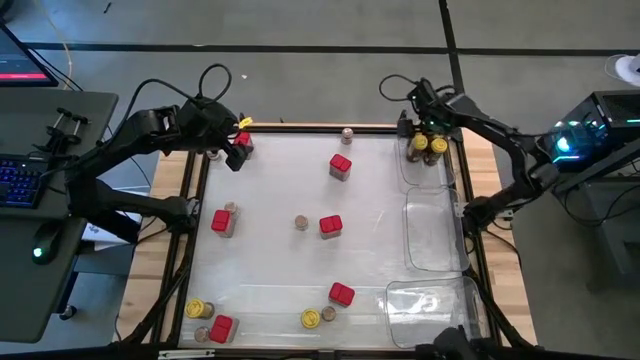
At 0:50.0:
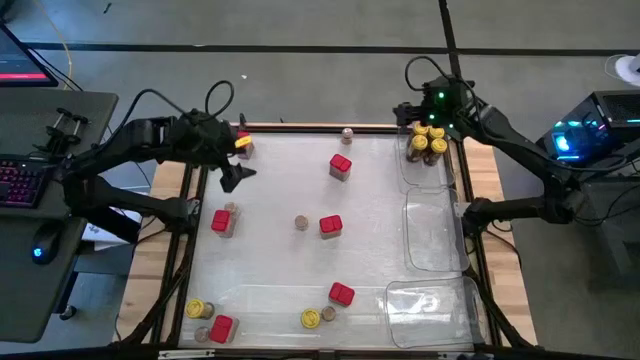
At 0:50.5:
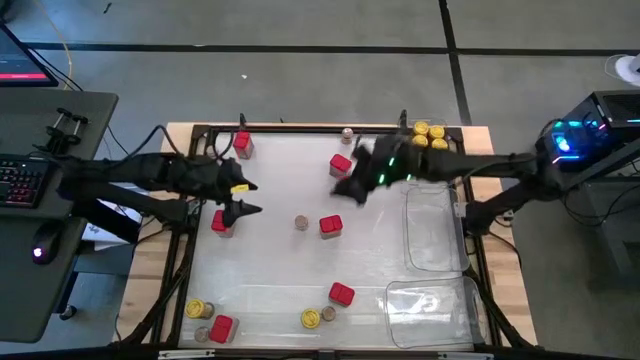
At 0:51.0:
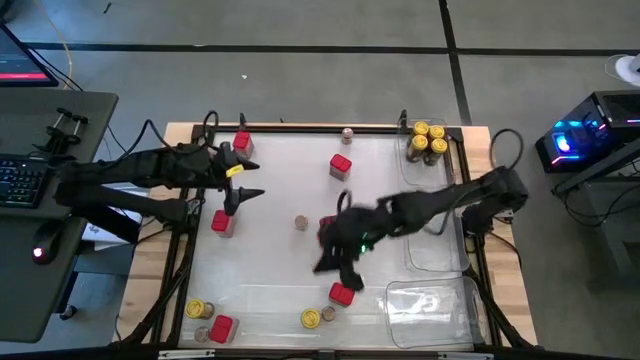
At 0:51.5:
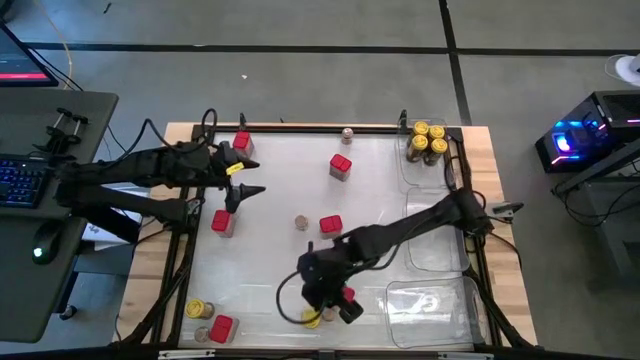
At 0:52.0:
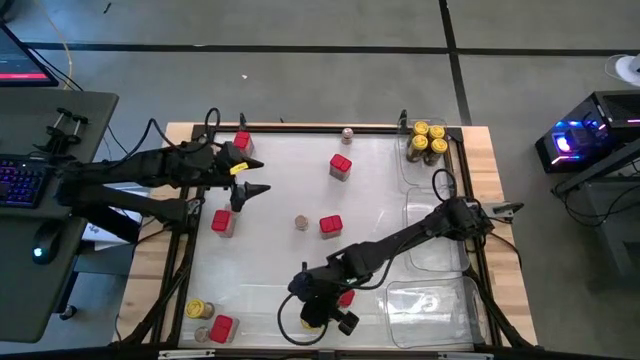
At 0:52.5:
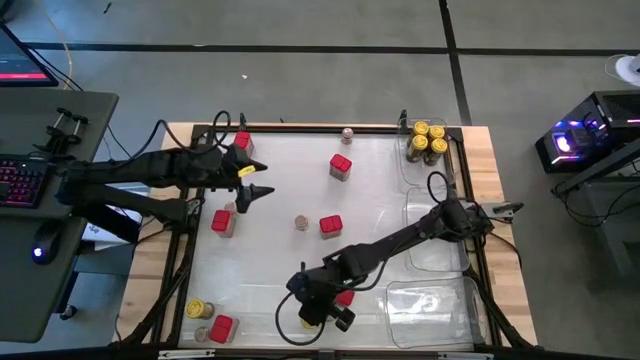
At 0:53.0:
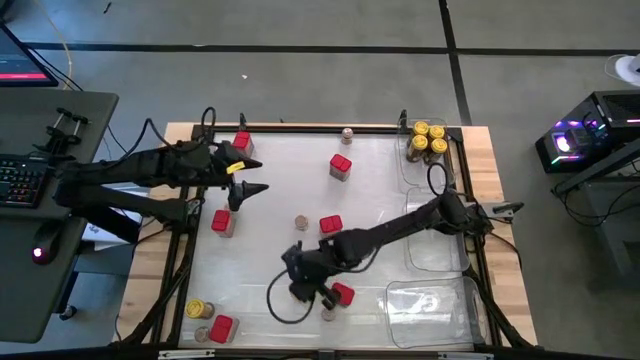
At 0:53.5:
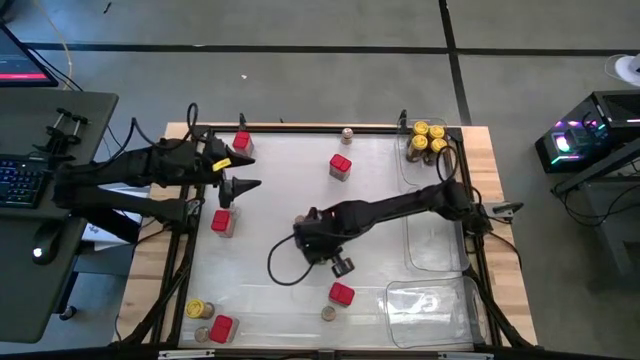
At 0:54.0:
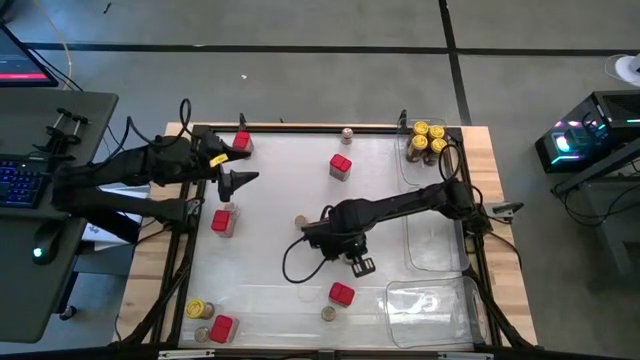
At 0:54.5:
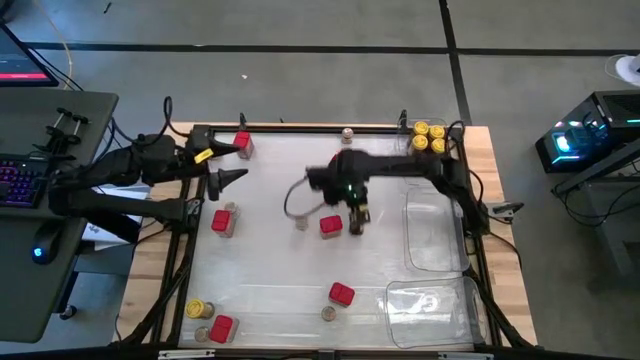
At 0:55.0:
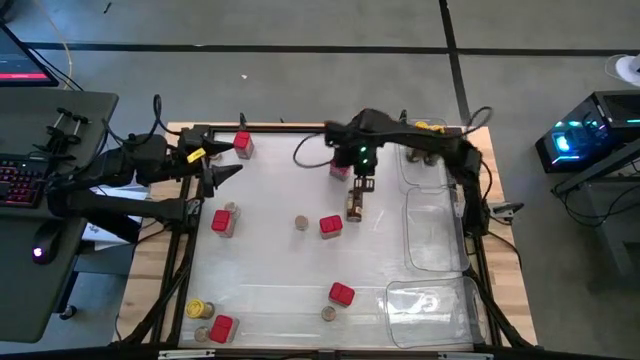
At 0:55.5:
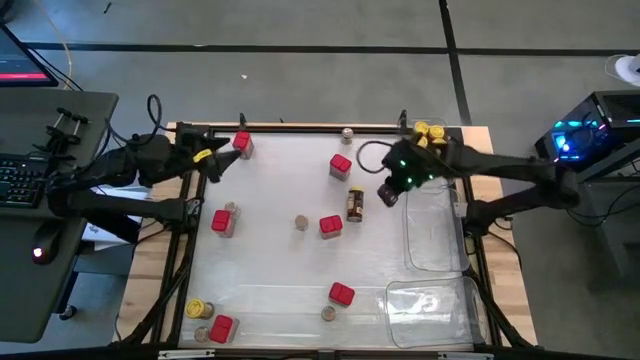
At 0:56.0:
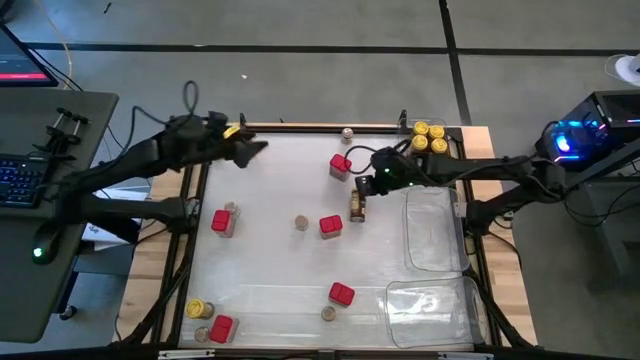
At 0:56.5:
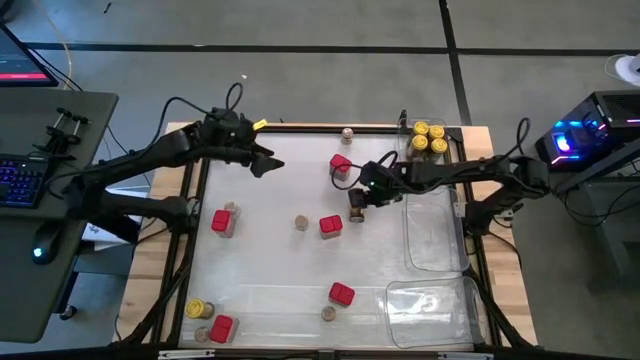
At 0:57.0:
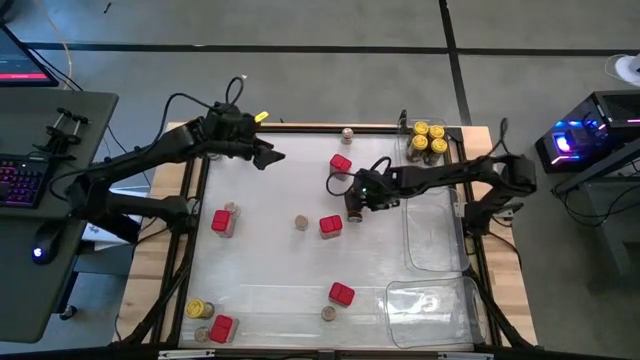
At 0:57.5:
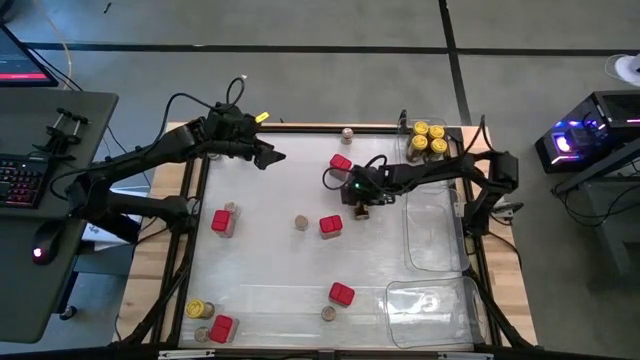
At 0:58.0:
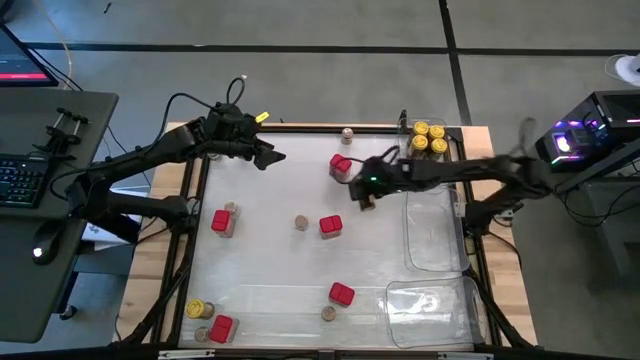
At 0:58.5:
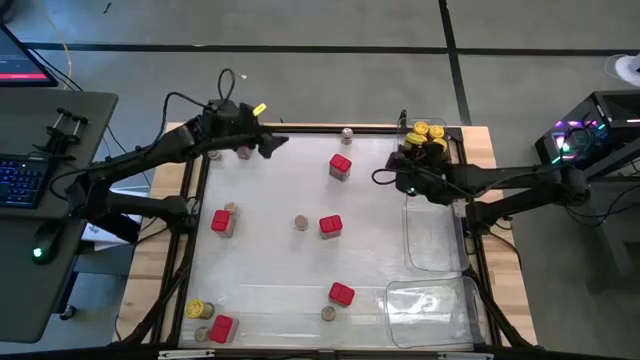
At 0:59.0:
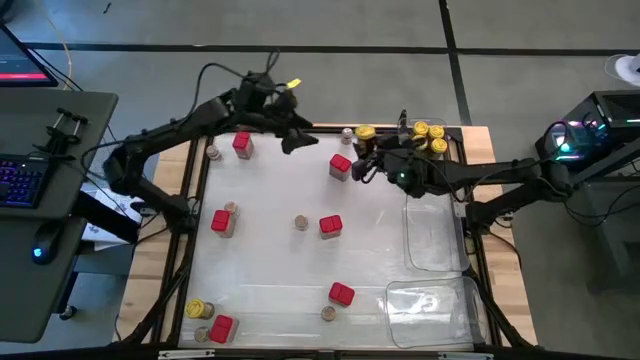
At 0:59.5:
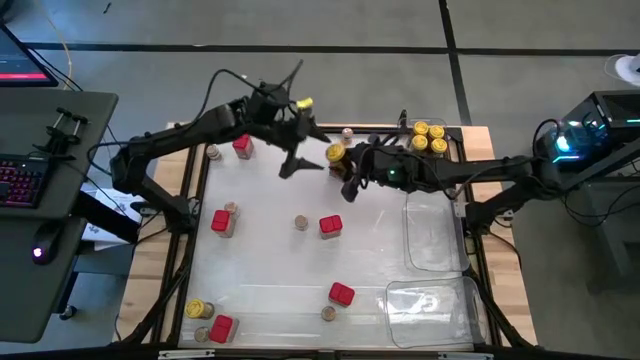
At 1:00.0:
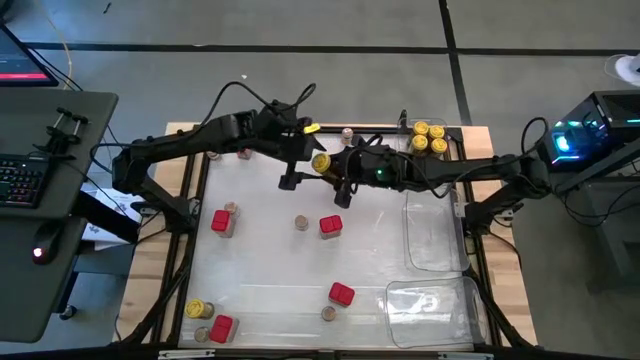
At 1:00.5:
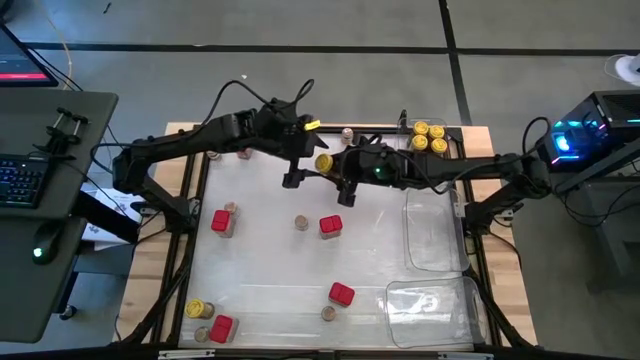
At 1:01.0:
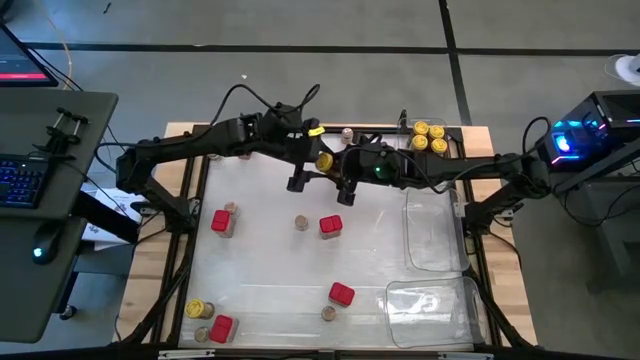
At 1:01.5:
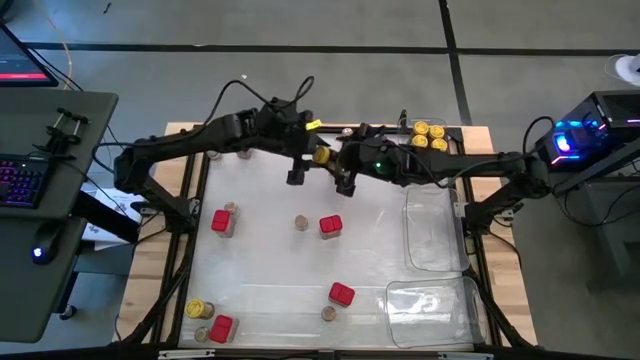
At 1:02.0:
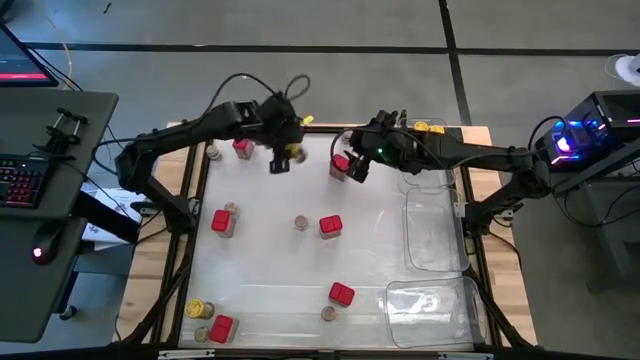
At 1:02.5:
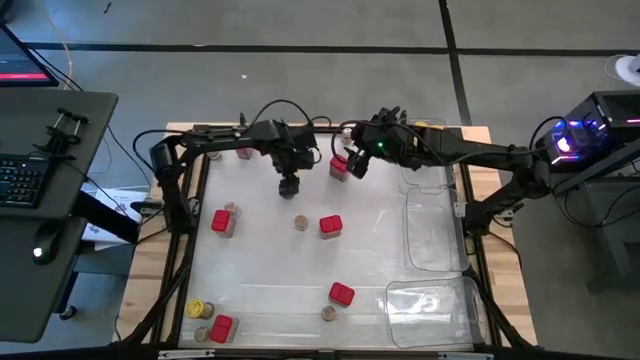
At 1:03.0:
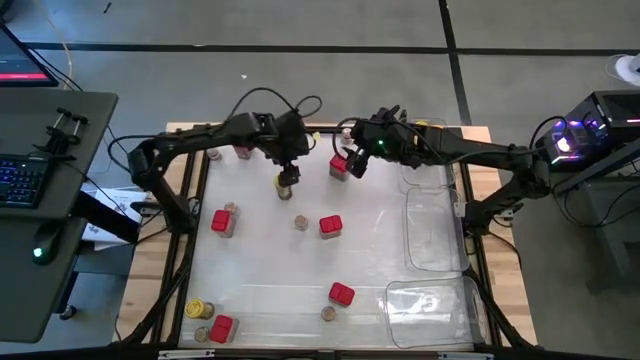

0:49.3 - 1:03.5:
Task: Sort spices by type
Put the yellow seasoning bottle into the top transparent bin
